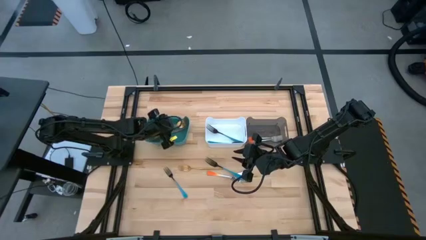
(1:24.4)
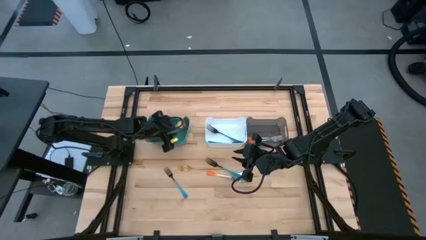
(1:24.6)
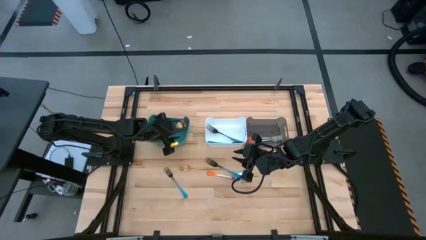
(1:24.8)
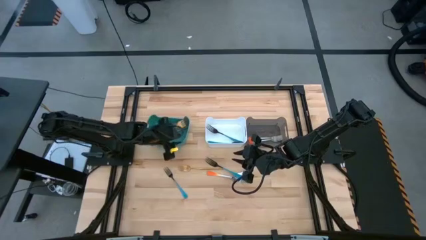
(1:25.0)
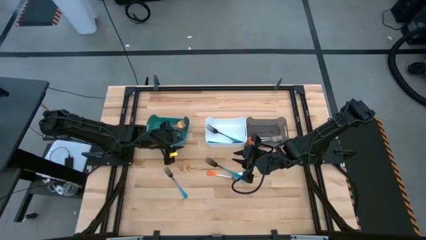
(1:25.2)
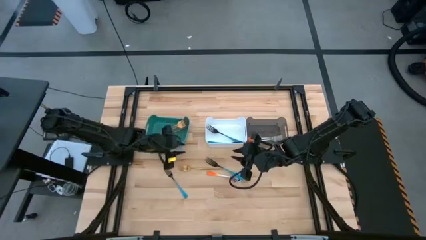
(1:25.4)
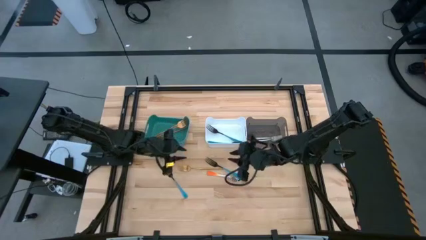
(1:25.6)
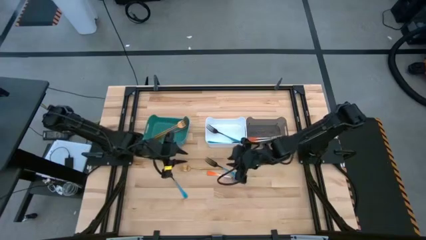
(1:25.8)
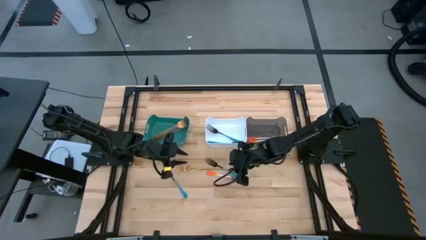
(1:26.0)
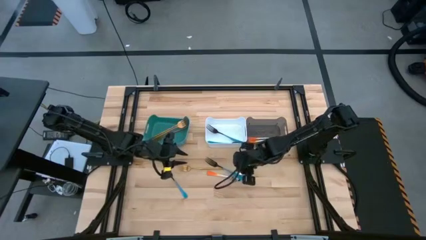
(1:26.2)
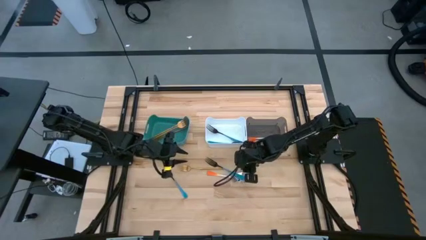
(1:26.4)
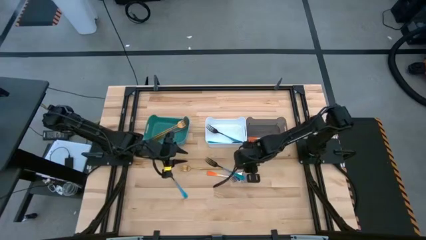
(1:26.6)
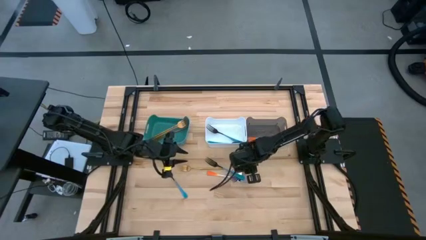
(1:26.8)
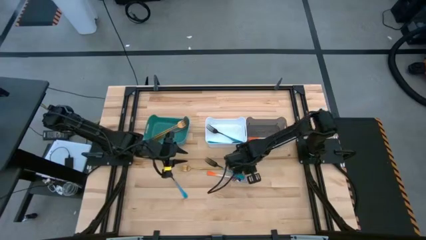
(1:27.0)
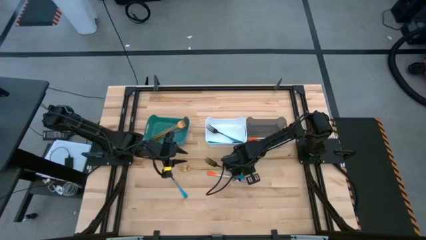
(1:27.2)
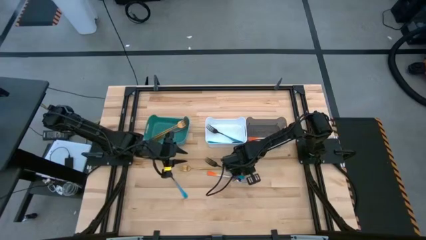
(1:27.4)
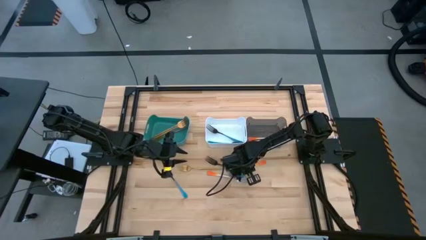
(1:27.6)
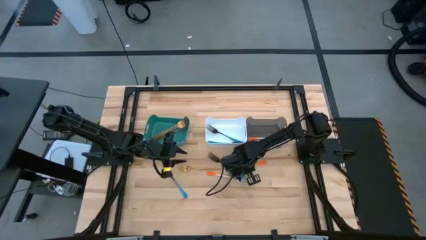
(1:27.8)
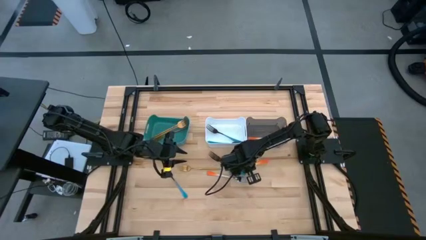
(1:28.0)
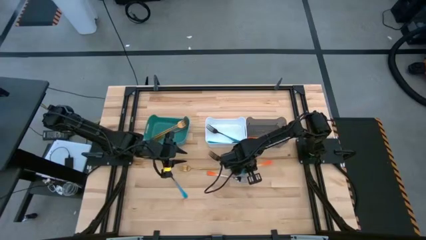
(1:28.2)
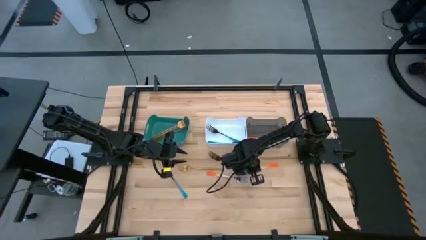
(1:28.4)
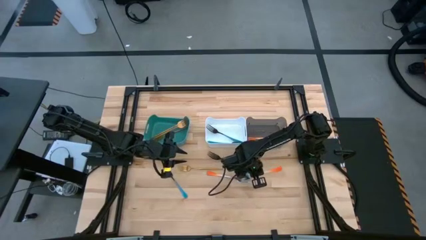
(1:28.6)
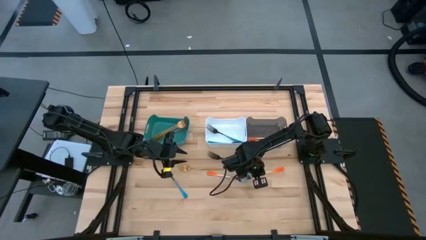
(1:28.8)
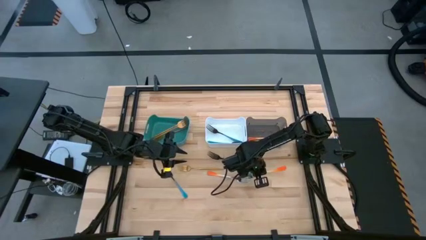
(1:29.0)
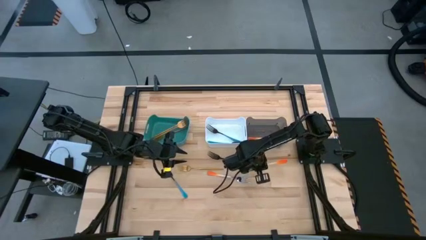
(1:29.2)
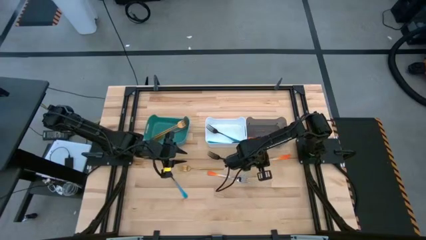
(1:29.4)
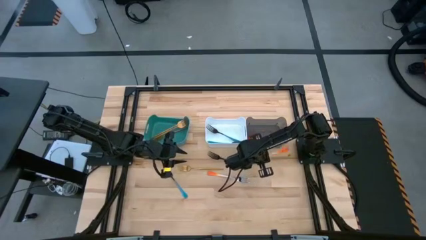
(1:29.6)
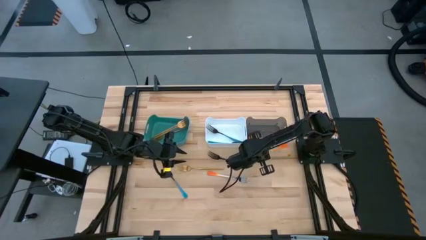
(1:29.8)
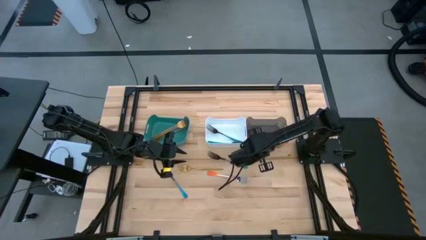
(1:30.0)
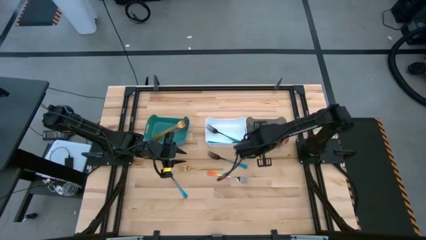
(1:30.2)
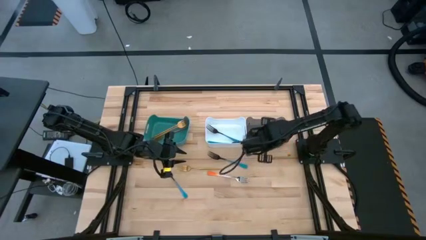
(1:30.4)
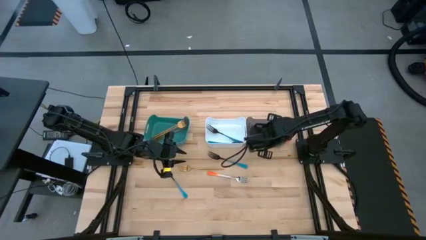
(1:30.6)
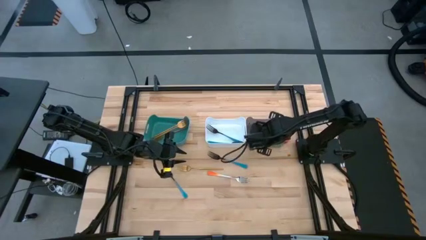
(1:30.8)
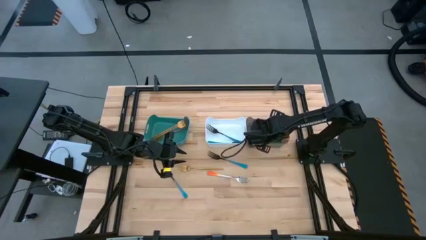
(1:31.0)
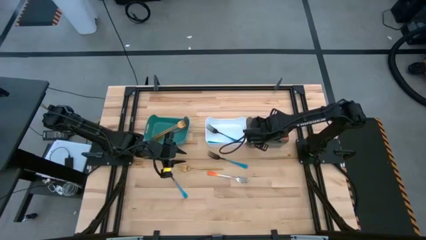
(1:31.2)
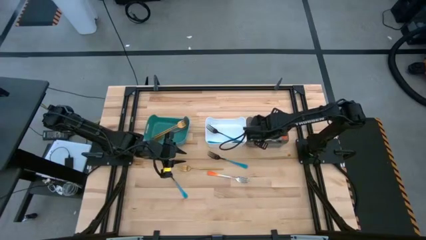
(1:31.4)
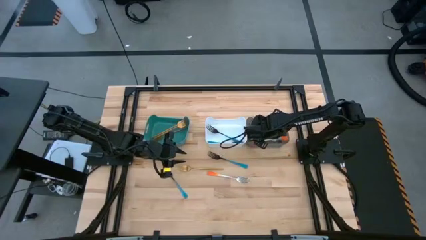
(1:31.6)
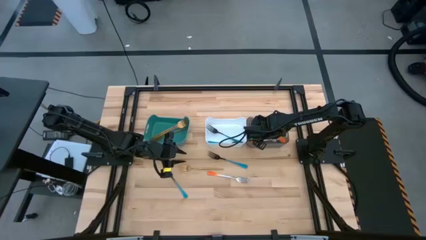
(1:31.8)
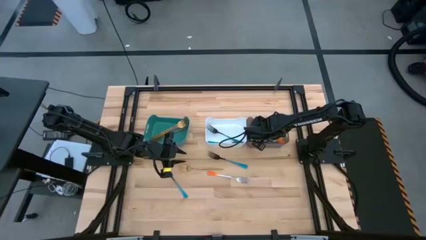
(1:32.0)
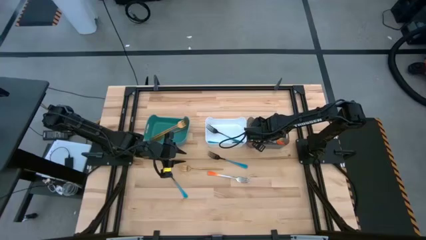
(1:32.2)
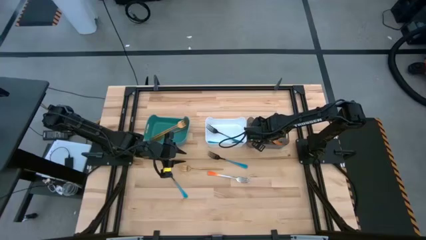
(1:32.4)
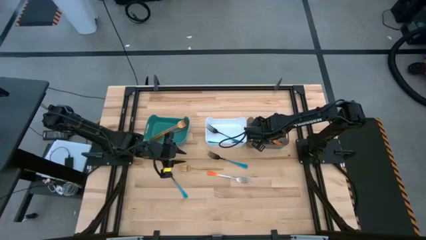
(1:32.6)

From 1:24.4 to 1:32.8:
Task: Sort silverware by color (type)
Put the right orange fork into the transparent black bin

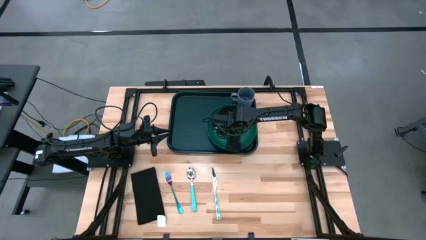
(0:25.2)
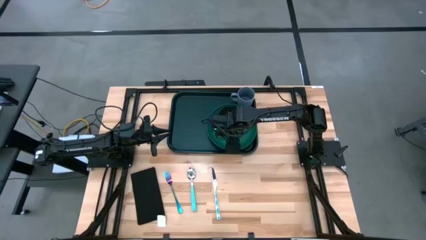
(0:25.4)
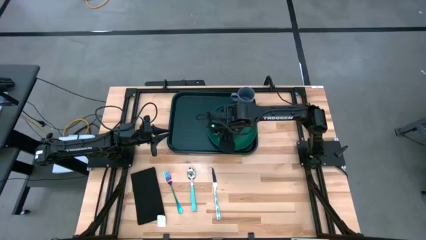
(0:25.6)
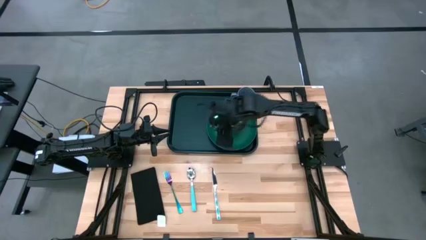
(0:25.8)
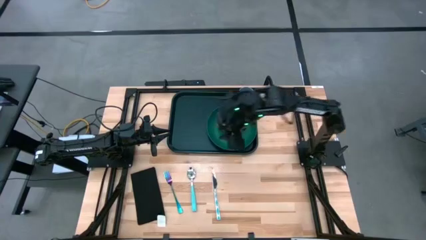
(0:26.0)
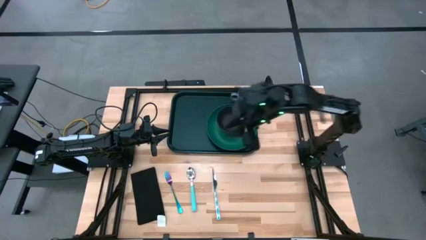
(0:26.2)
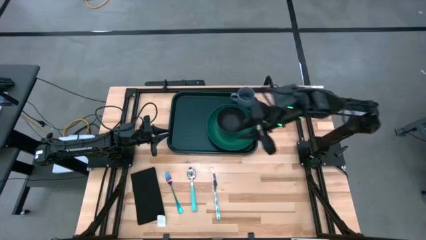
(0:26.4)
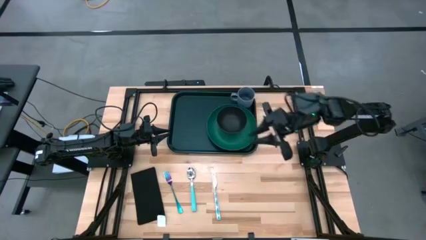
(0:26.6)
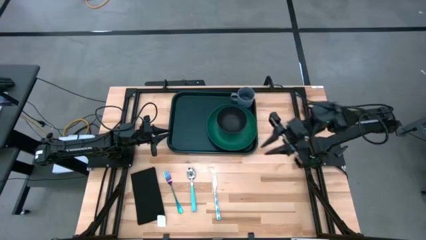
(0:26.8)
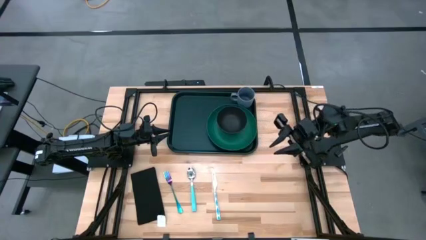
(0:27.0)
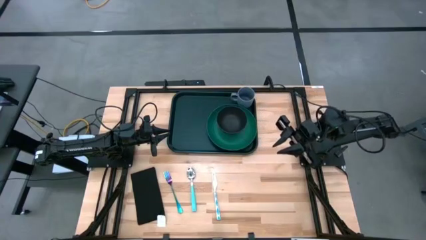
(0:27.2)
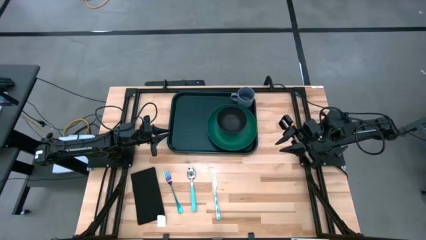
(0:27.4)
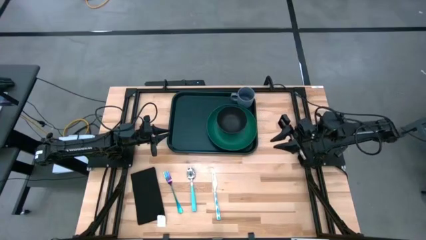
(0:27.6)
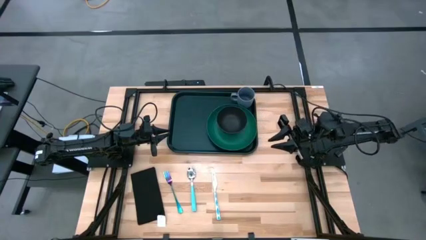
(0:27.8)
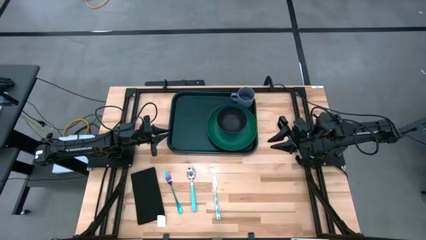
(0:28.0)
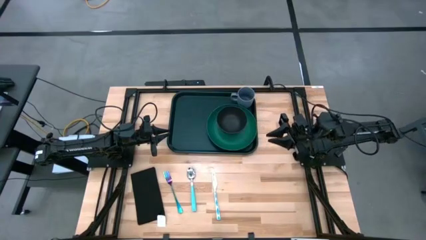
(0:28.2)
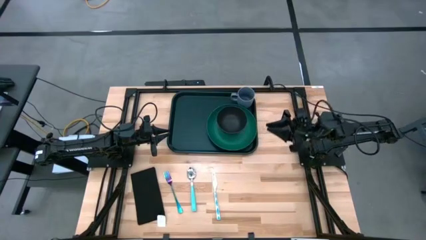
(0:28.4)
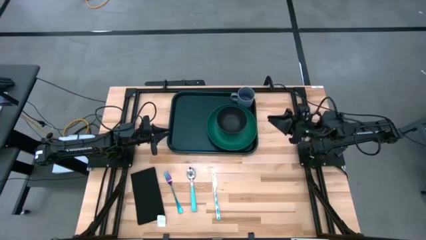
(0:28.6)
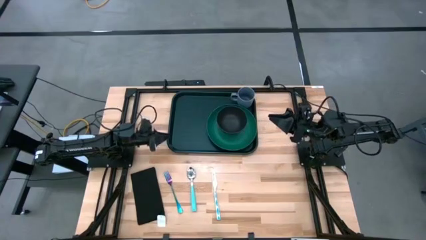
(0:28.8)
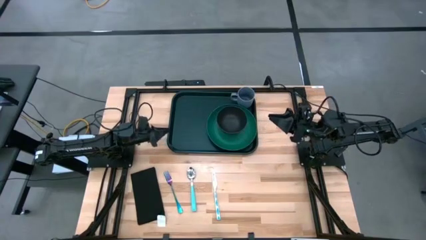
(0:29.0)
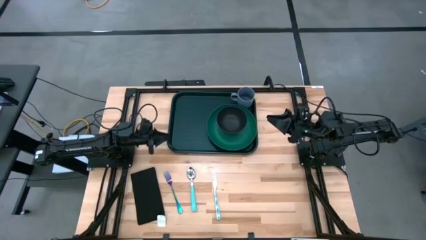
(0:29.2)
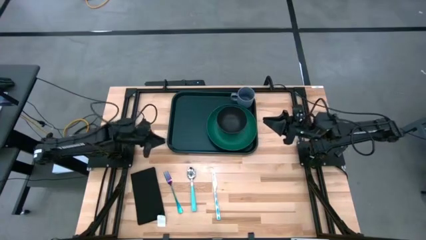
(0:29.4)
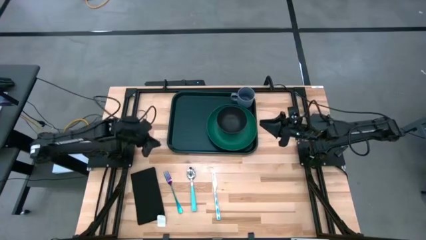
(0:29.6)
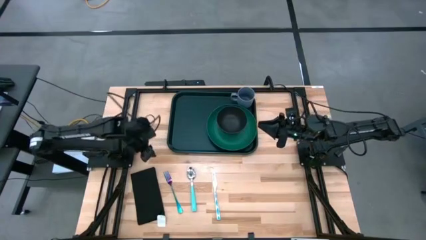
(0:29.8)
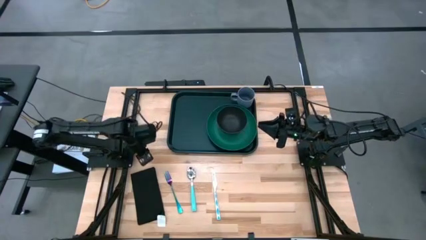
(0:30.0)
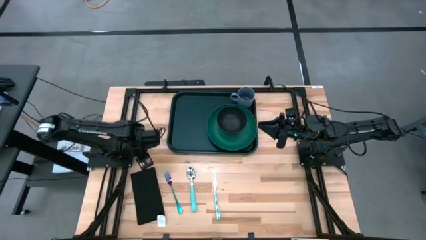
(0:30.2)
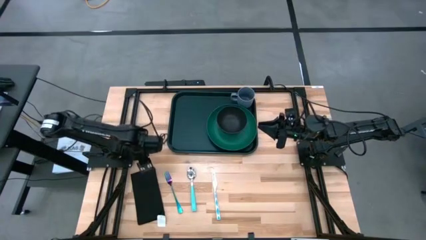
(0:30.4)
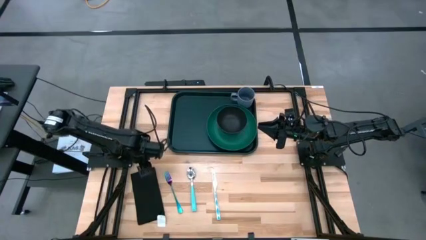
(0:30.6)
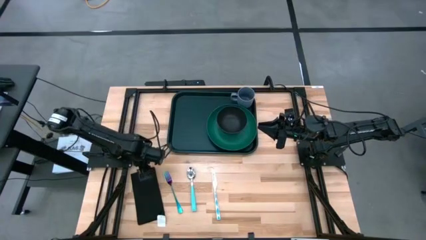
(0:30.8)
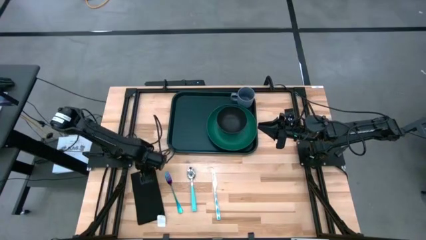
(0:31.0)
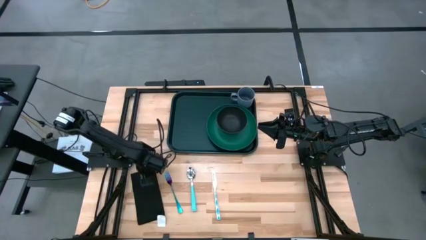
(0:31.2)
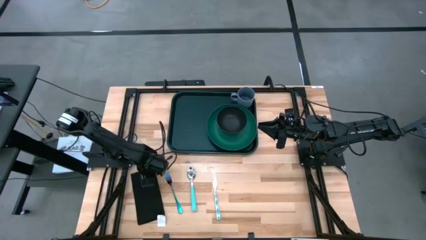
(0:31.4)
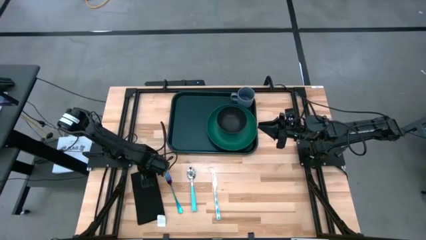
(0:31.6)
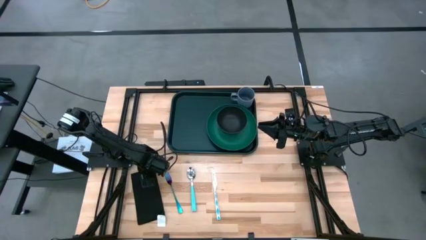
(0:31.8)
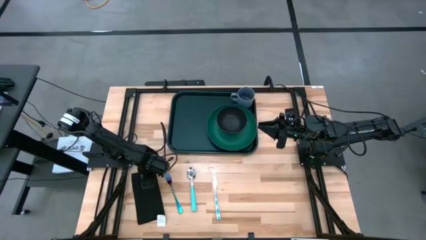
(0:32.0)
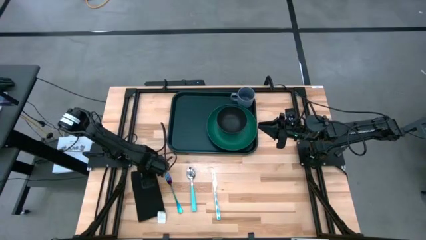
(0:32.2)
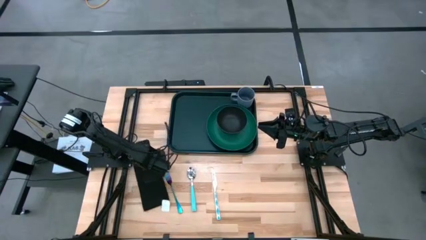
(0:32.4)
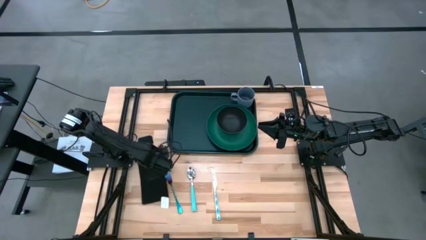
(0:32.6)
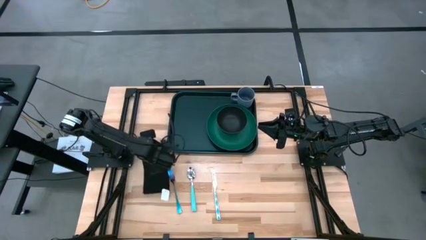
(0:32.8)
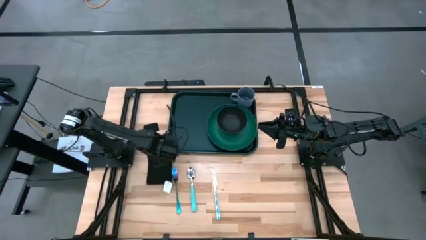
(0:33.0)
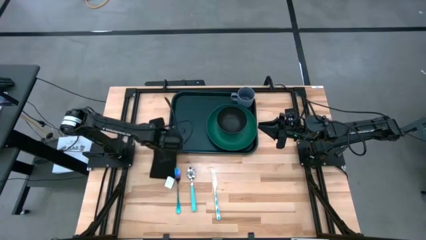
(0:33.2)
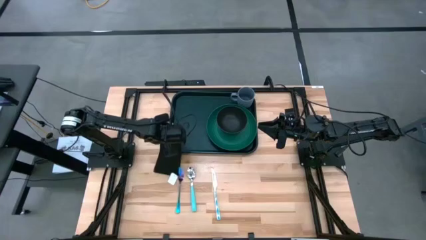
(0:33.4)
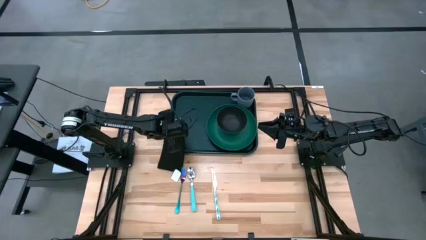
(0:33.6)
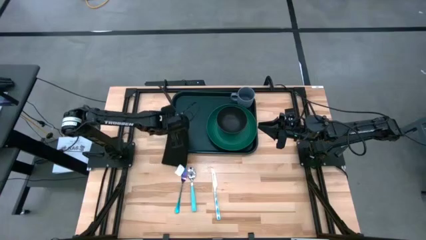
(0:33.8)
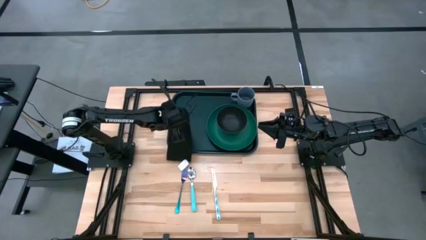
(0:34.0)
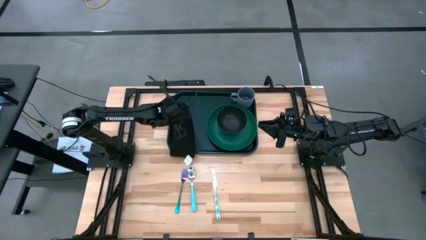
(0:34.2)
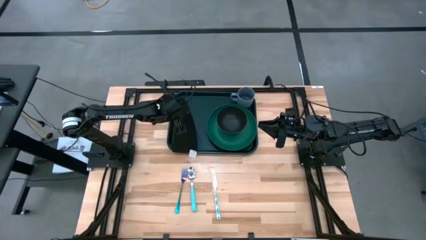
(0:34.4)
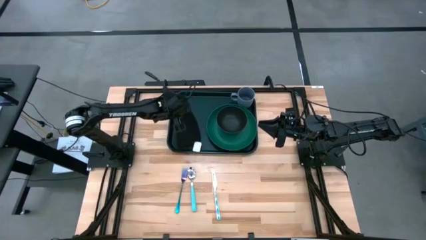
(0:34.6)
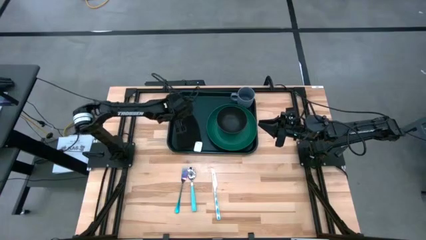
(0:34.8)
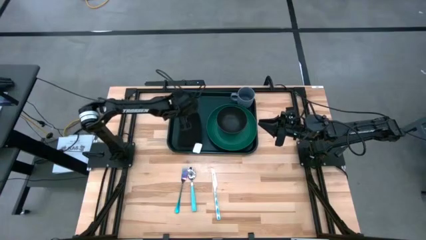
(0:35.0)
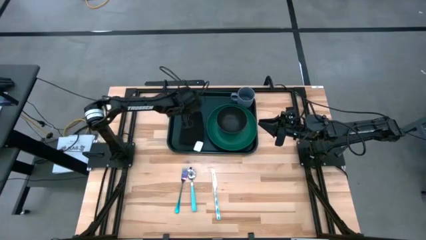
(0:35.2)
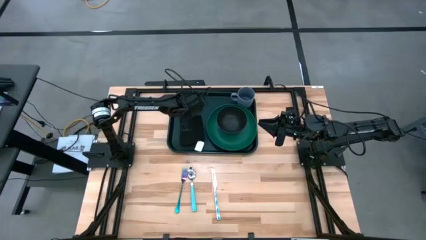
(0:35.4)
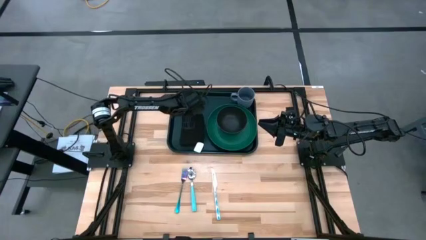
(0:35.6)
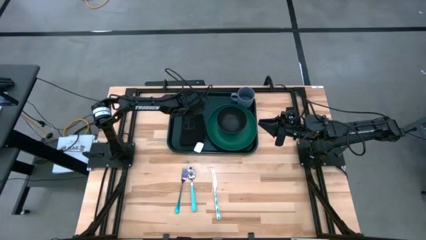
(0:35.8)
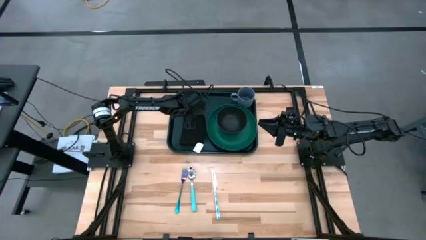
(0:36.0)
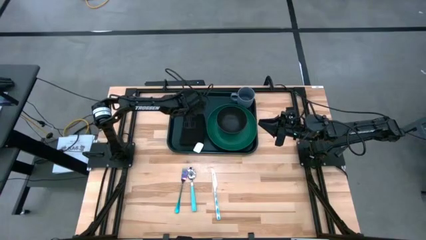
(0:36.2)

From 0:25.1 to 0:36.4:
Task: Set up tray
Put the black napkin on the black tray to the left of the green plate
